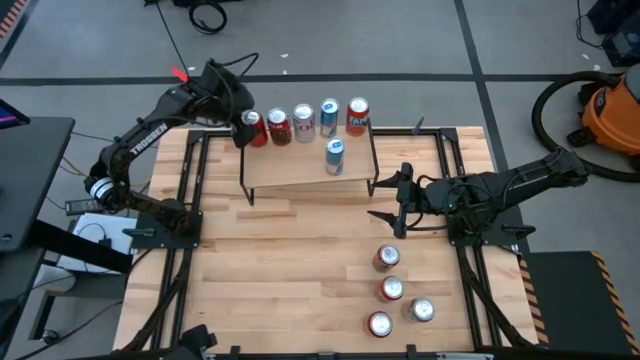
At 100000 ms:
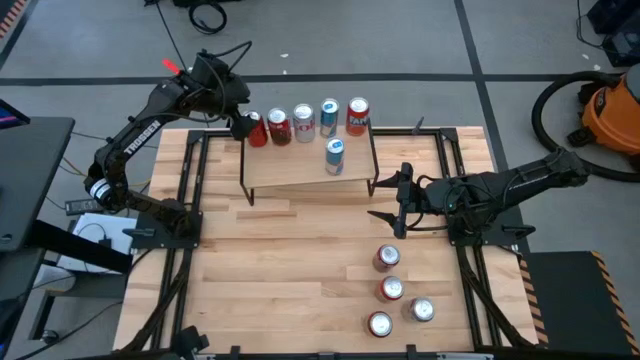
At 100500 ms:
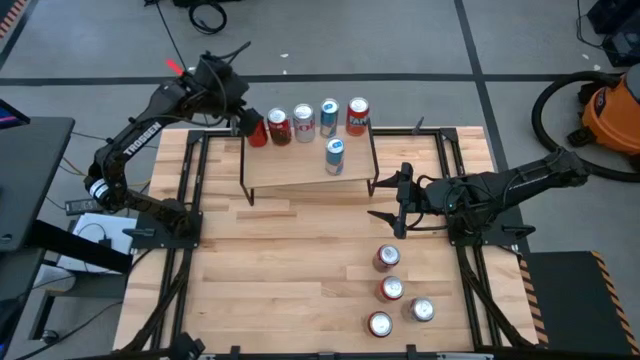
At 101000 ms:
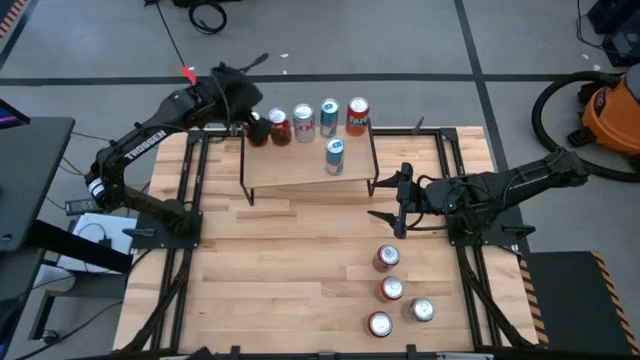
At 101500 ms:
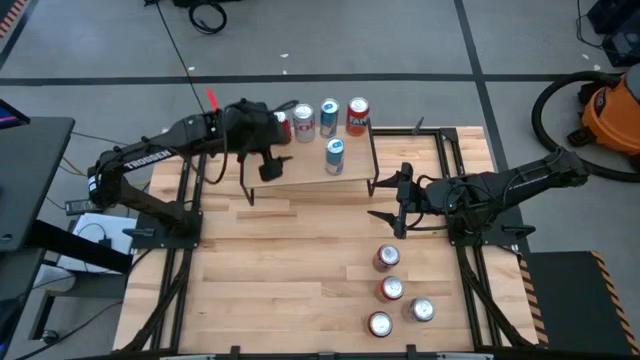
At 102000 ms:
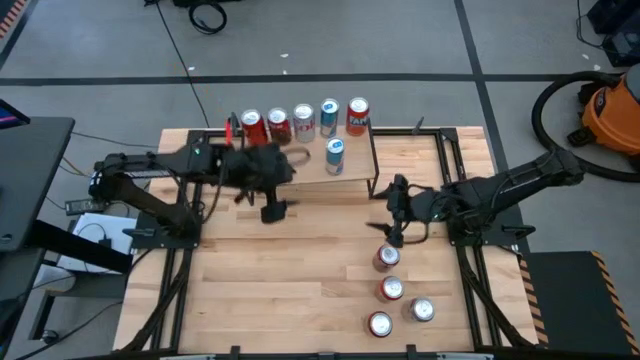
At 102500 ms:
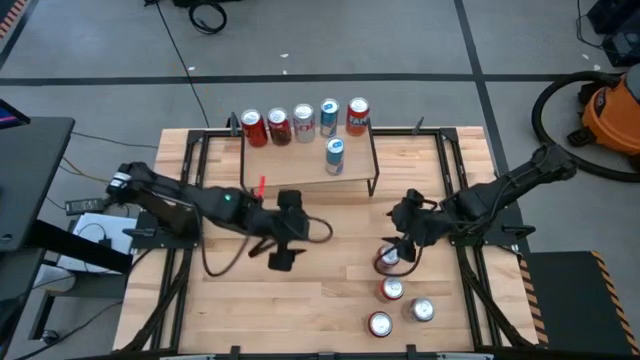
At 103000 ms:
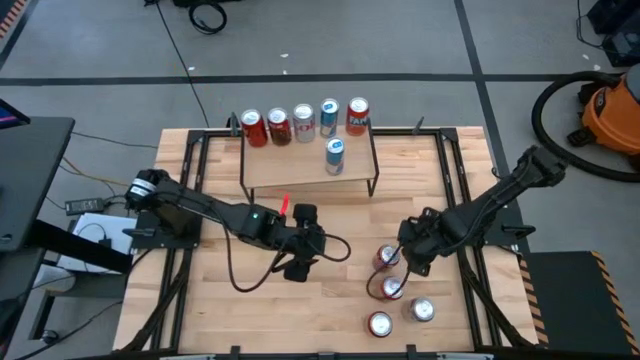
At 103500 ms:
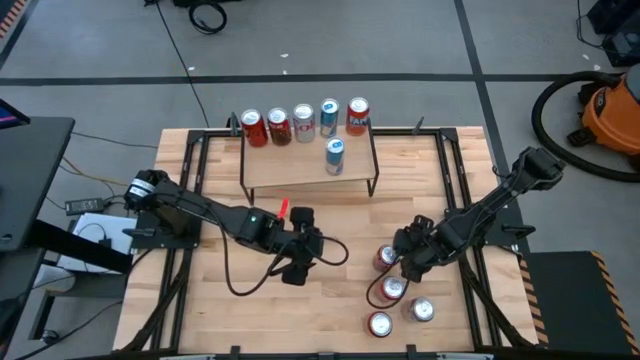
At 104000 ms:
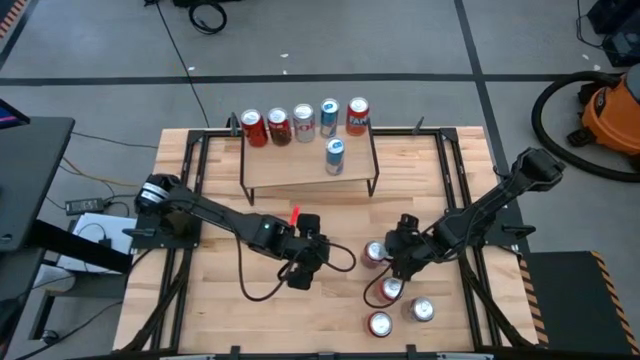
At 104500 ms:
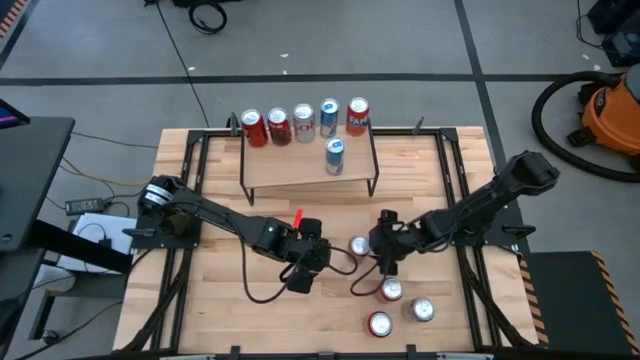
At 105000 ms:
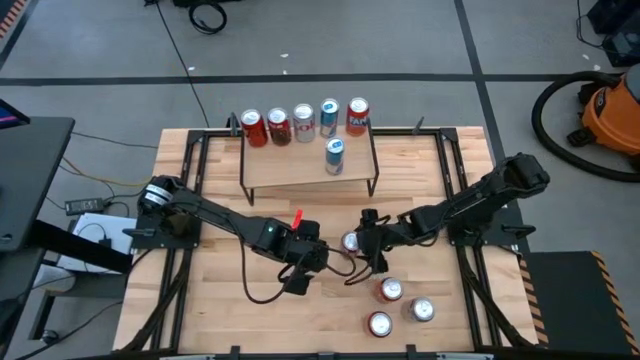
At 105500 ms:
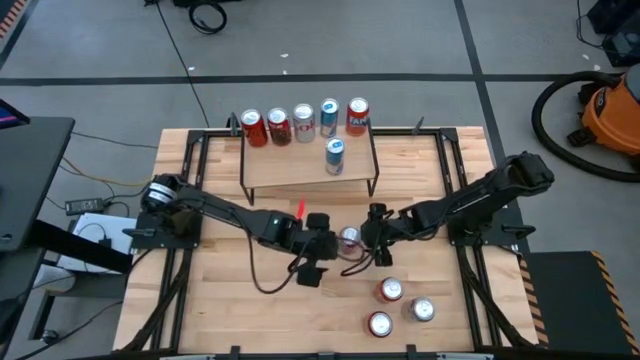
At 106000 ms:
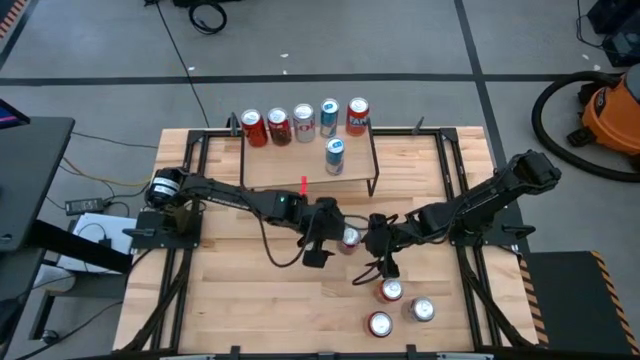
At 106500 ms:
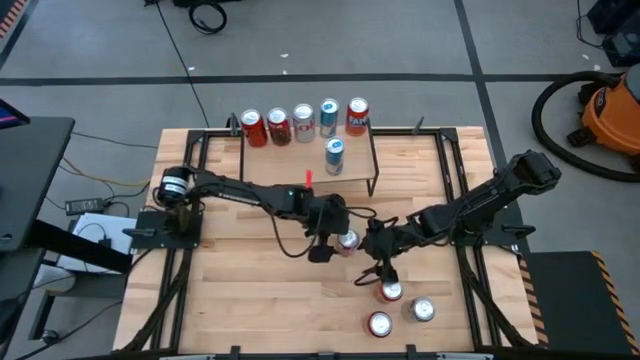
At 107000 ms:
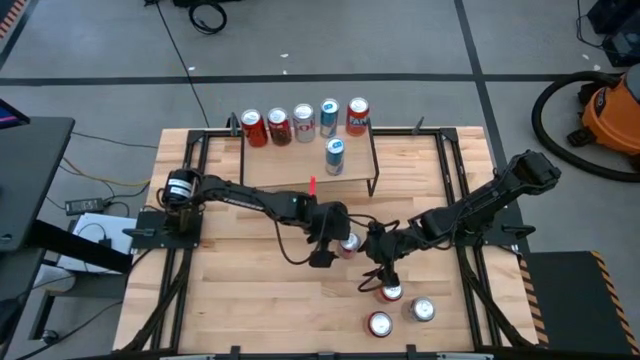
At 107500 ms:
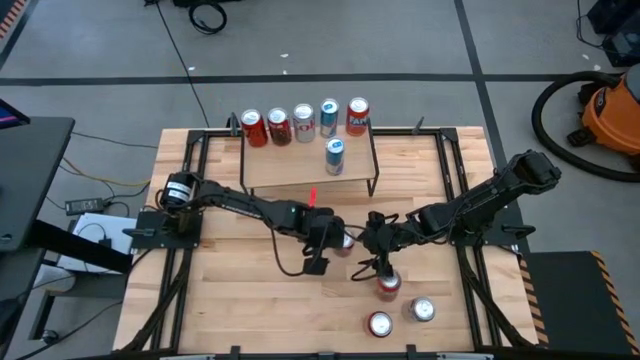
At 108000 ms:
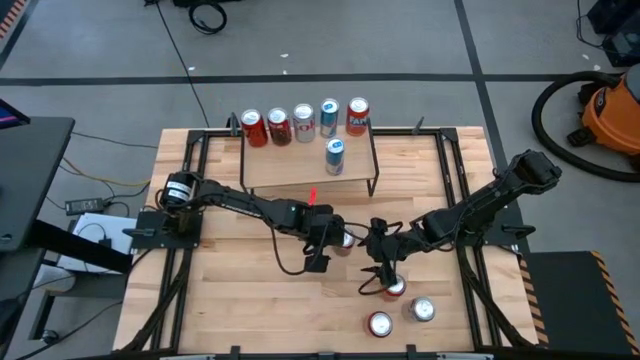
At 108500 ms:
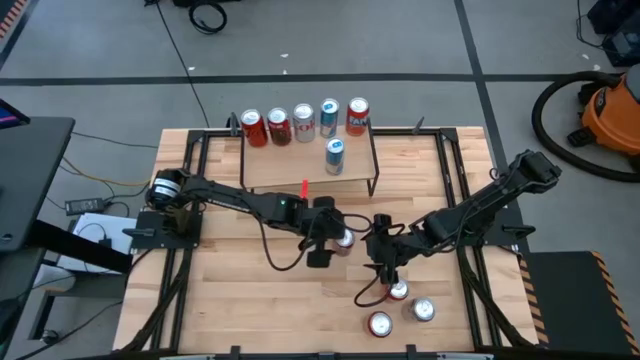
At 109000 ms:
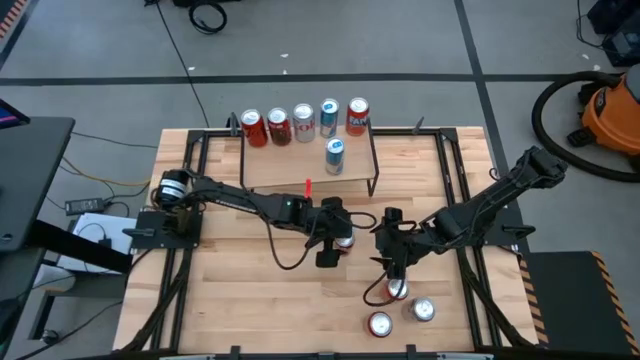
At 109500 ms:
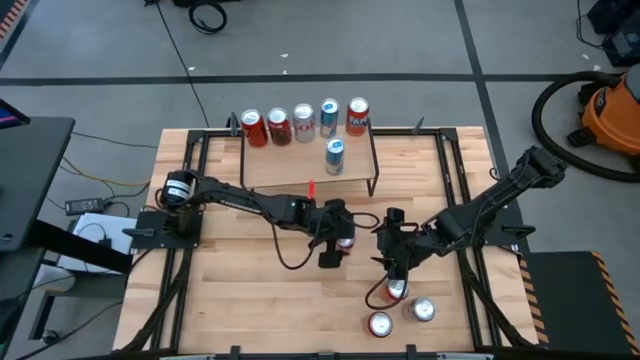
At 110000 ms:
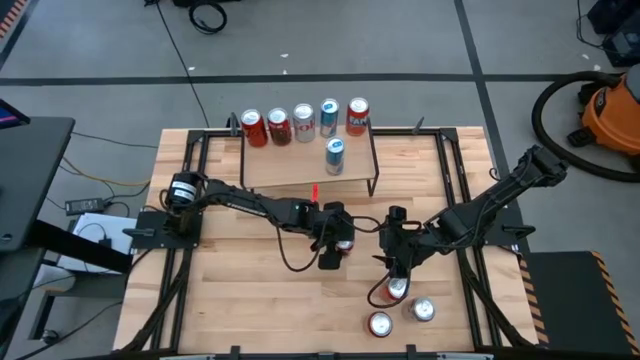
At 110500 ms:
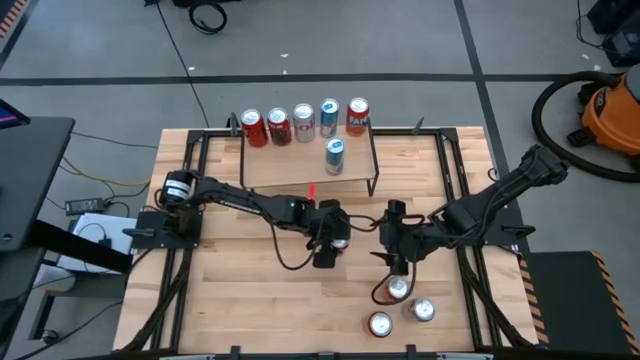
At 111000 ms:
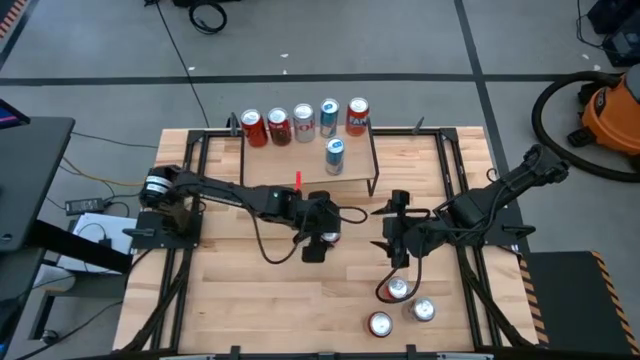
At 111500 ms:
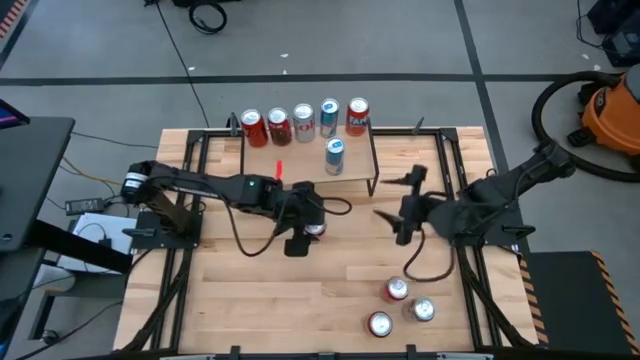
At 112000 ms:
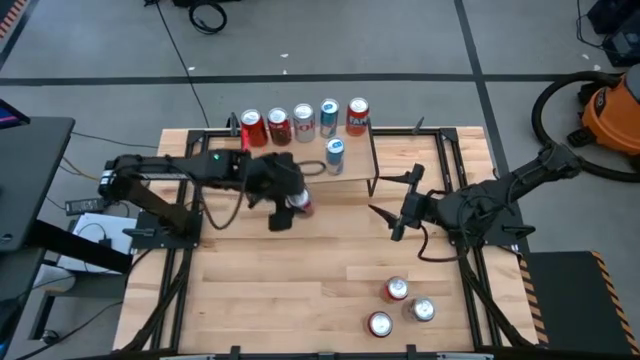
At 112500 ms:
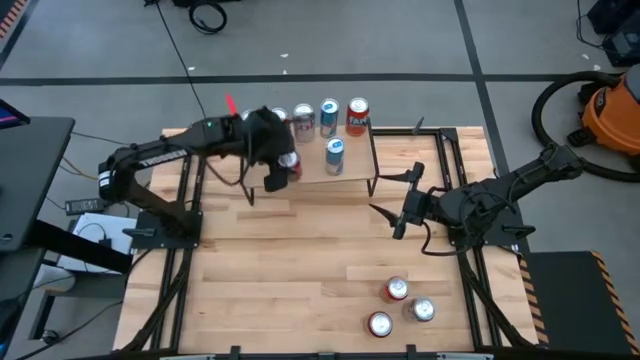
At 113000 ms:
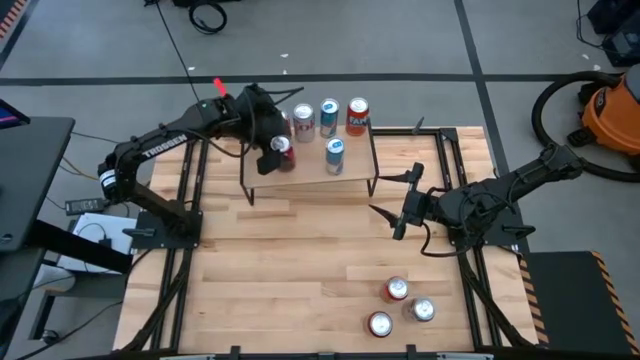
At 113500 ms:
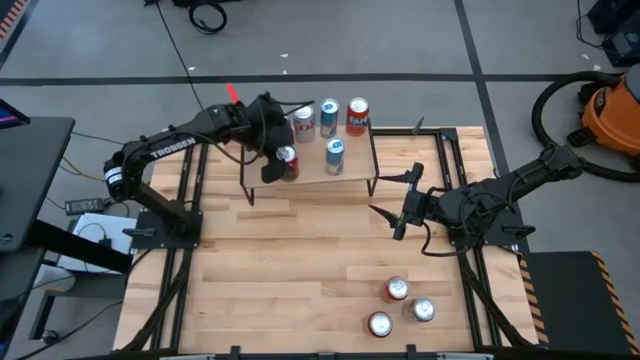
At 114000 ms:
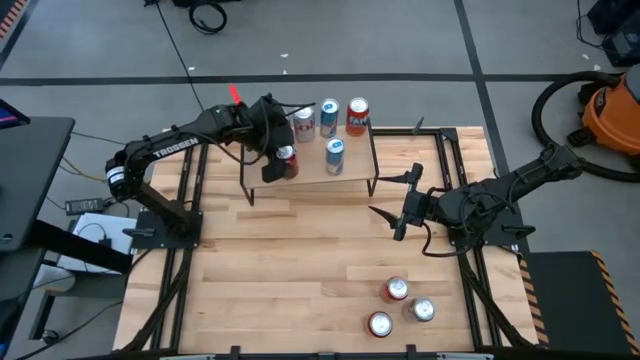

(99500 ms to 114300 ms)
Task: Place canned beverage on shelf
Put the white soda can on the shelf aligned with the other white soda can

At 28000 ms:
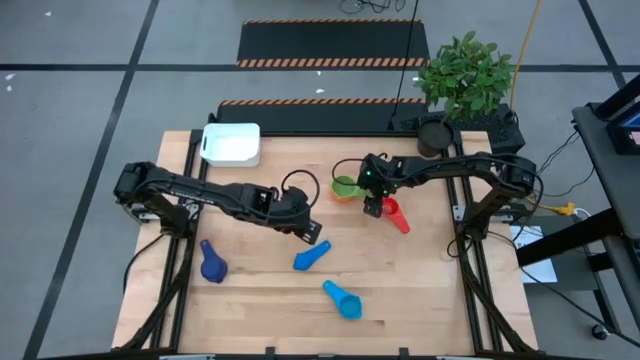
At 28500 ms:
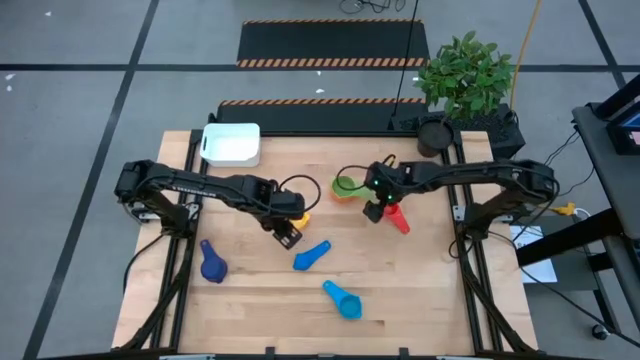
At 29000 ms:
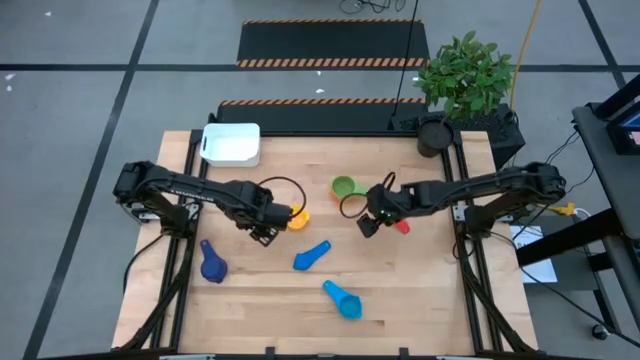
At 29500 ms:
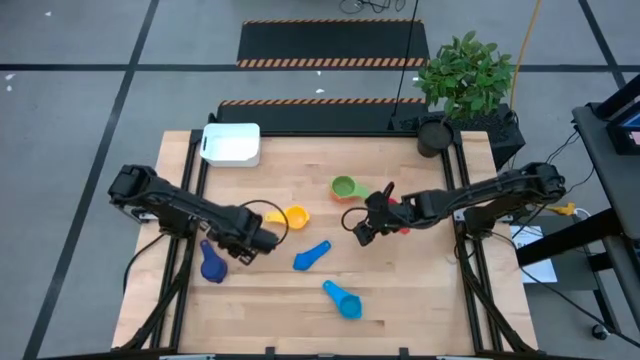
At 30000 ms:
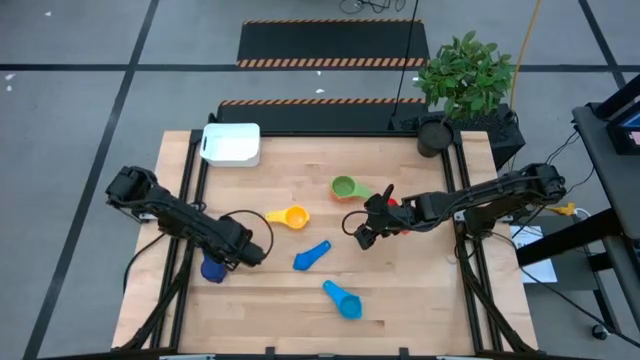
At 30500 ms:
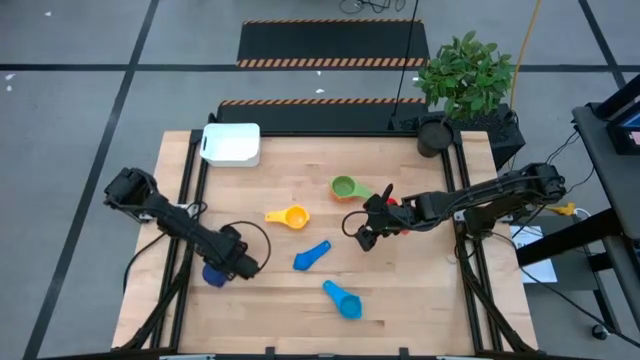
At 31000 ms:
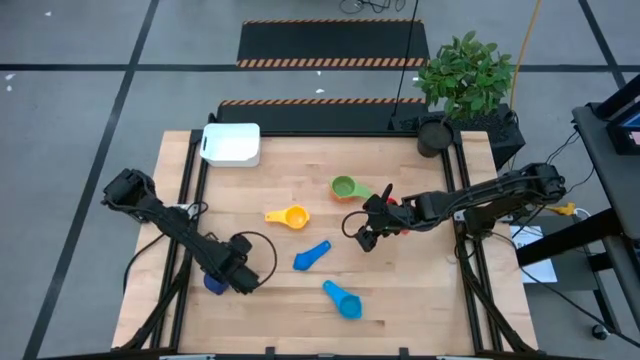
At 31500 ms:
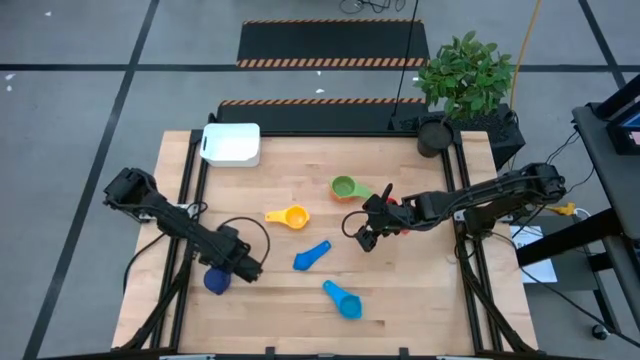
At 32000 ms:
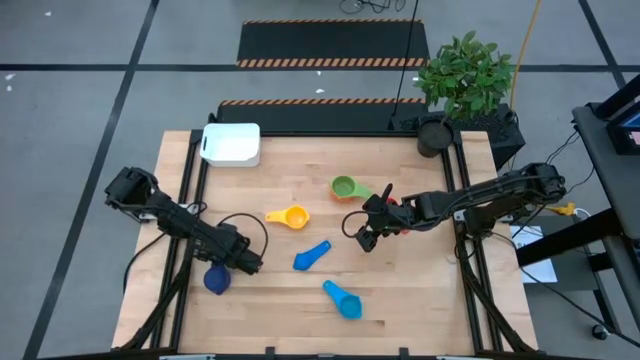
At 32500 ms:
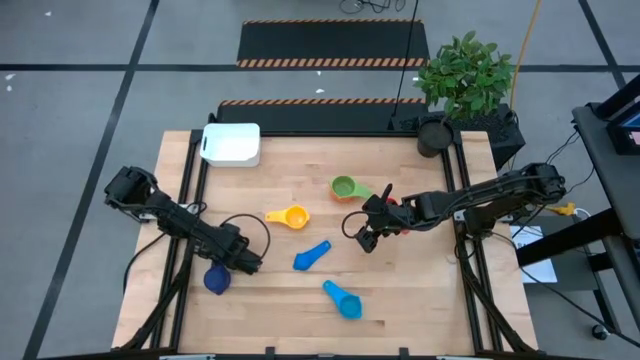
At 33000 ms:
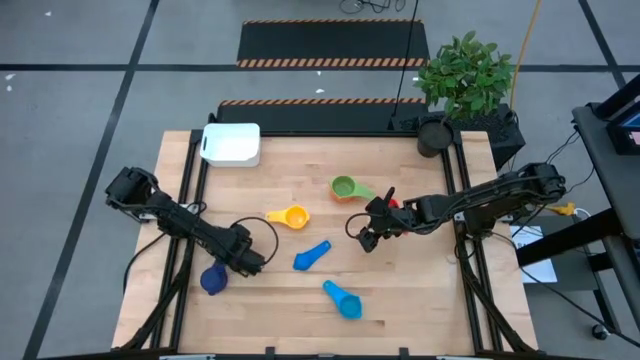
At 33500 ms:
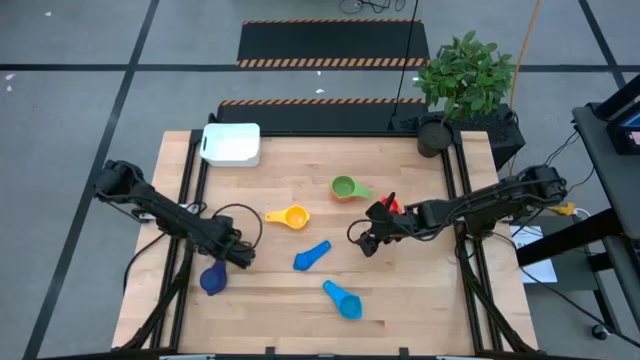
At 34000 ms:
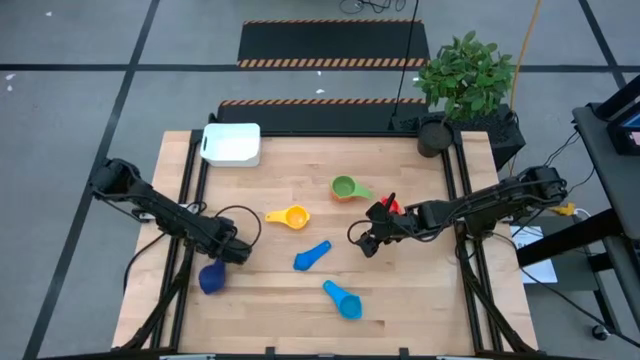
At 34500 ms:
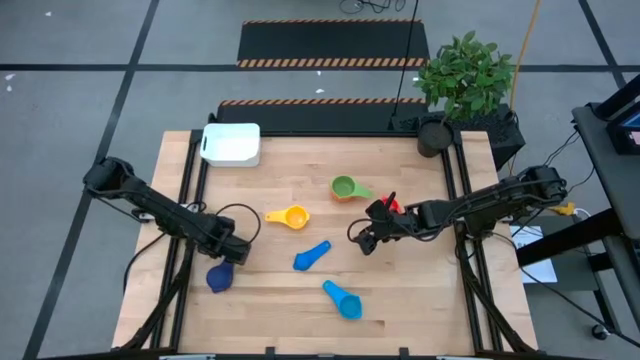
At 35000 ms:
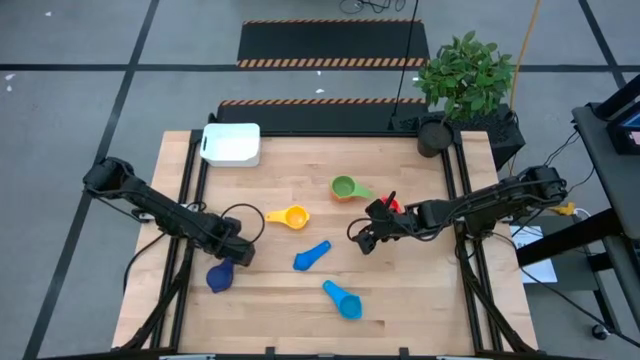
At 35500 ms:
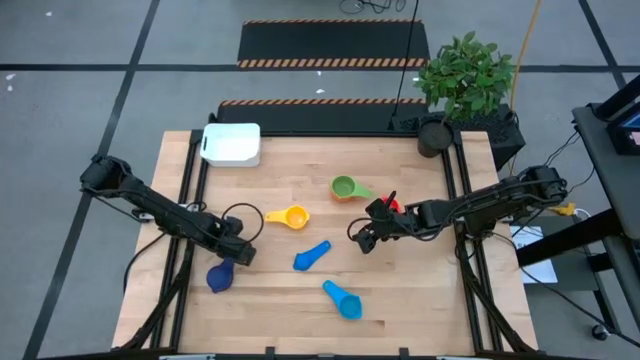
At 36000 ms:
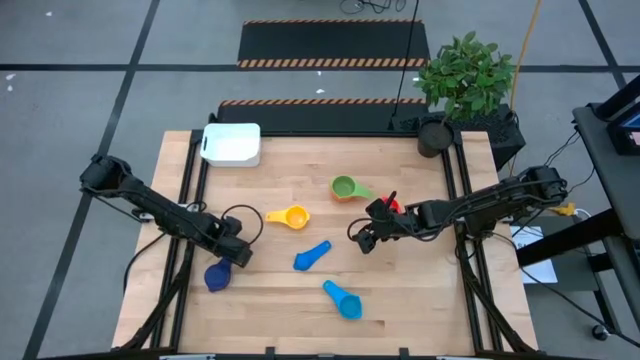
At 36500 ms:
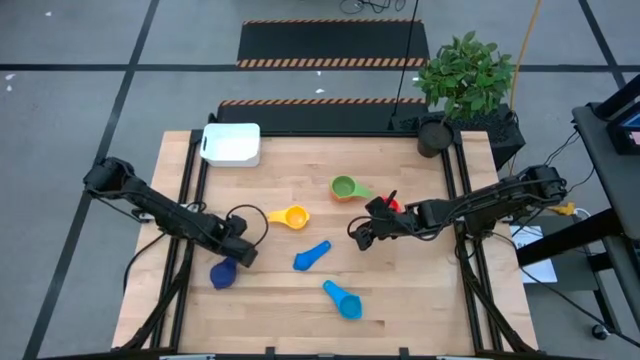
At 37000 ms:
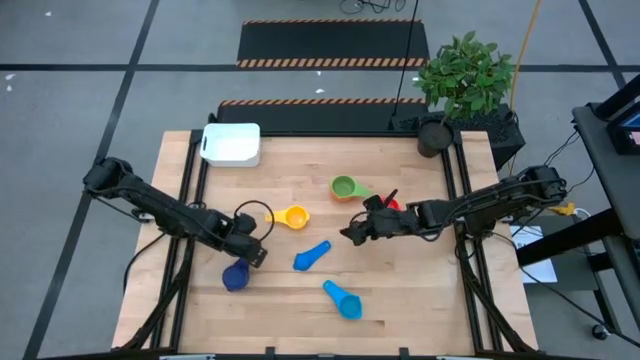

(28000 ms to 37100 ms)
Task: Nest measuring cups in basket
Stack the dark blue measuring cup into the light green measuring cup
